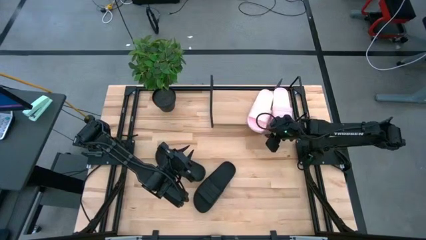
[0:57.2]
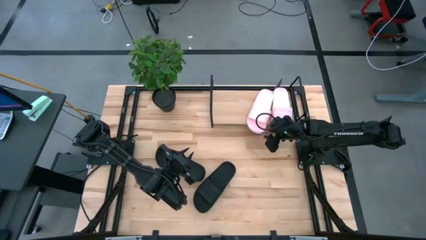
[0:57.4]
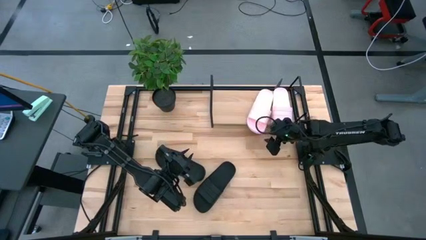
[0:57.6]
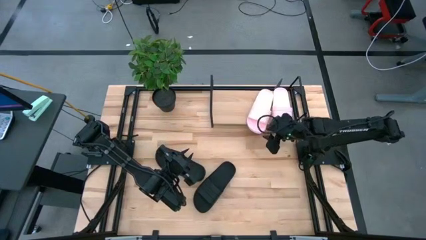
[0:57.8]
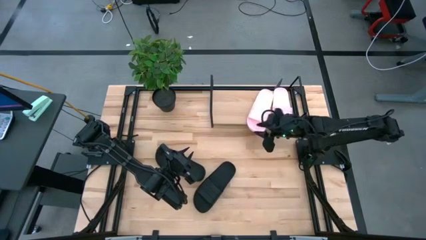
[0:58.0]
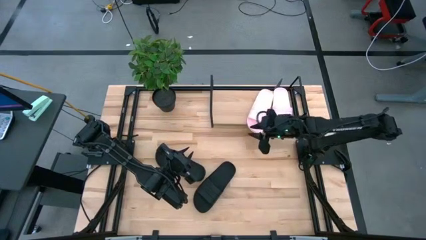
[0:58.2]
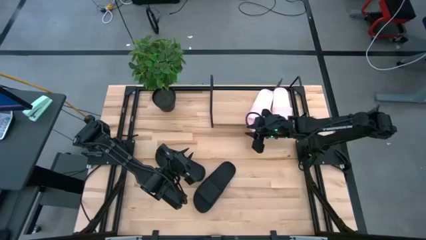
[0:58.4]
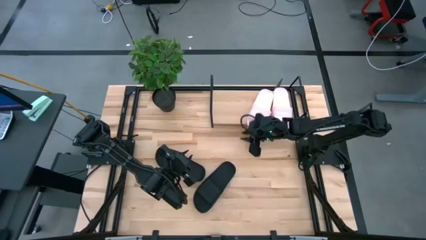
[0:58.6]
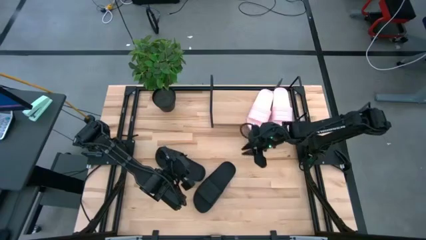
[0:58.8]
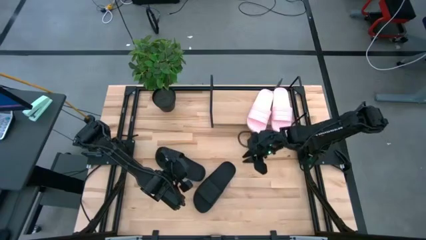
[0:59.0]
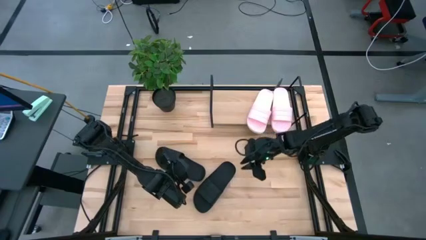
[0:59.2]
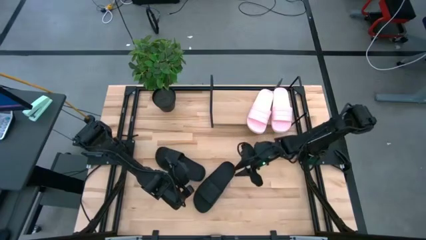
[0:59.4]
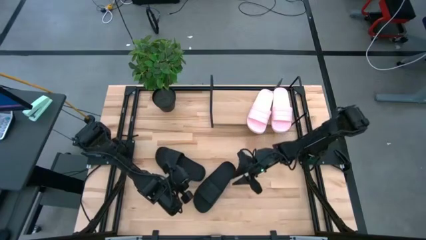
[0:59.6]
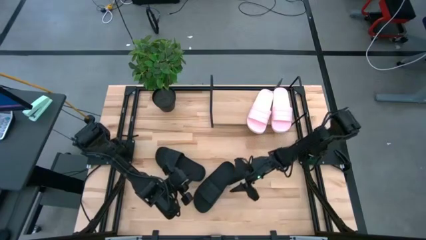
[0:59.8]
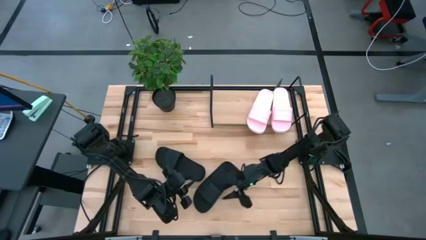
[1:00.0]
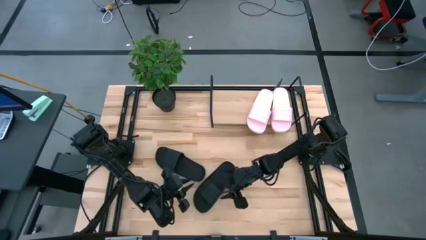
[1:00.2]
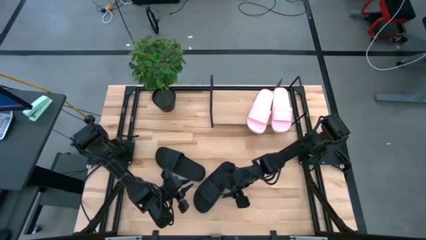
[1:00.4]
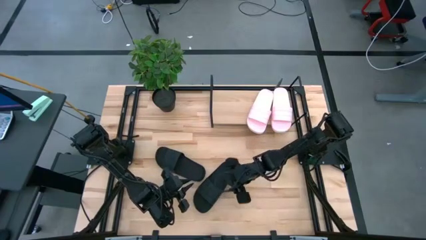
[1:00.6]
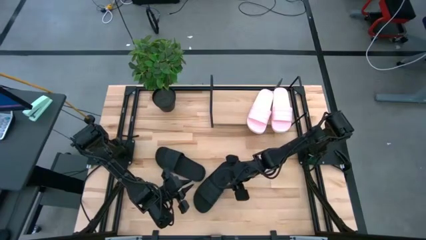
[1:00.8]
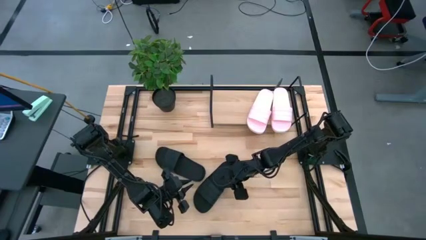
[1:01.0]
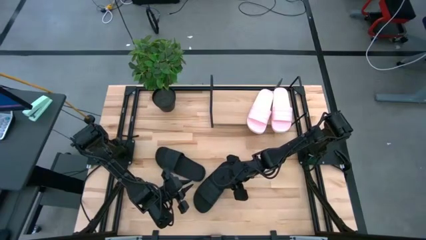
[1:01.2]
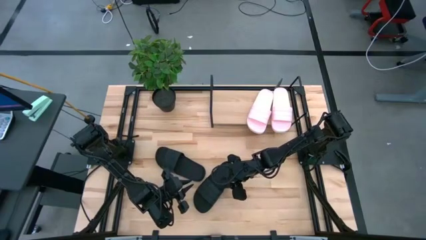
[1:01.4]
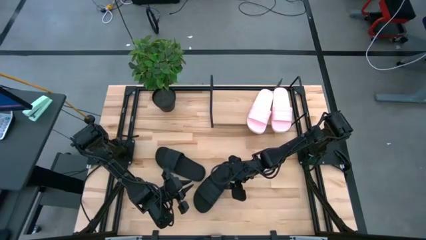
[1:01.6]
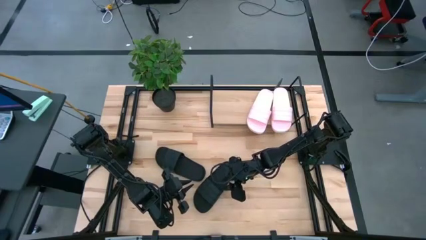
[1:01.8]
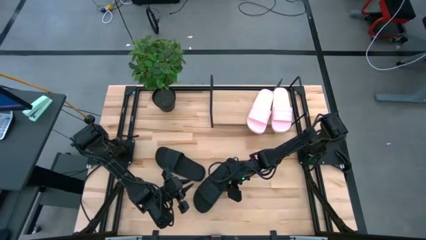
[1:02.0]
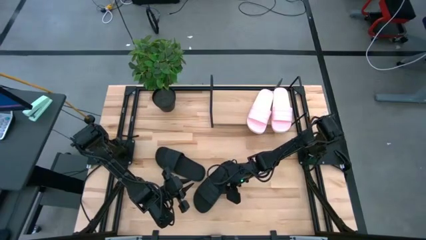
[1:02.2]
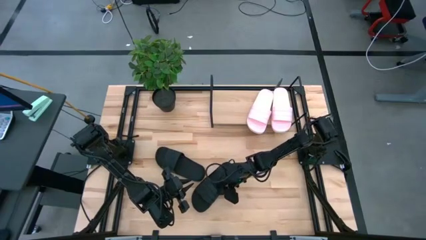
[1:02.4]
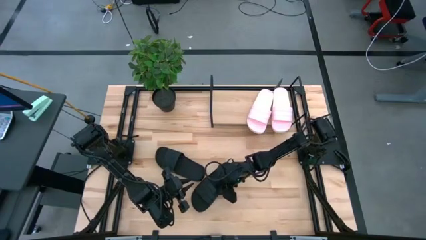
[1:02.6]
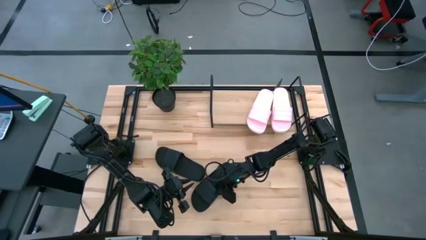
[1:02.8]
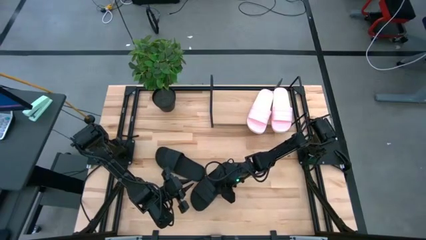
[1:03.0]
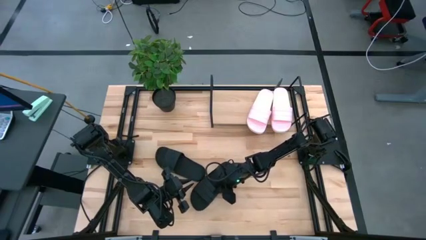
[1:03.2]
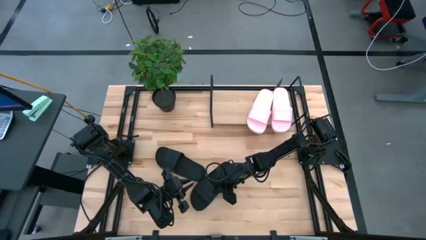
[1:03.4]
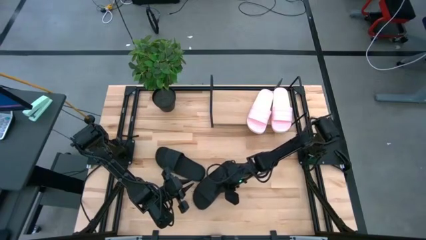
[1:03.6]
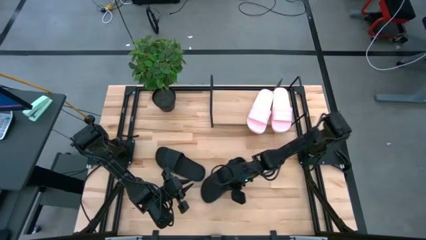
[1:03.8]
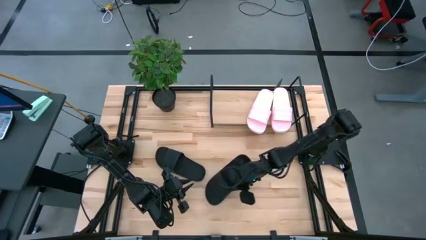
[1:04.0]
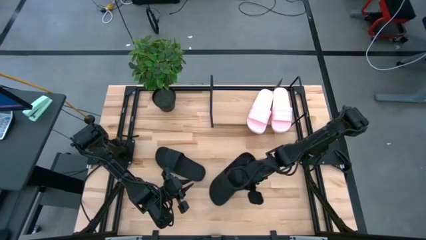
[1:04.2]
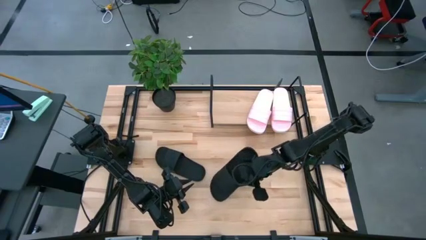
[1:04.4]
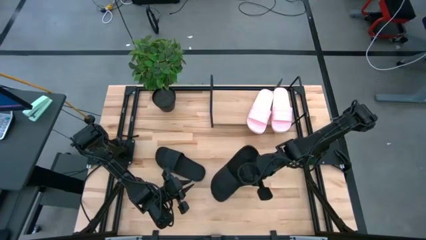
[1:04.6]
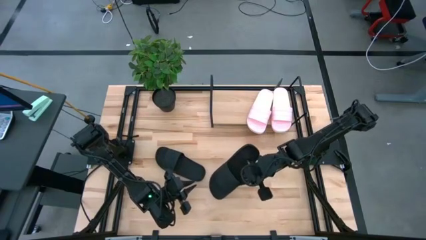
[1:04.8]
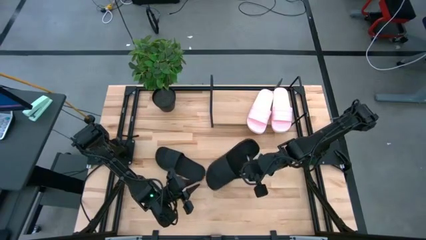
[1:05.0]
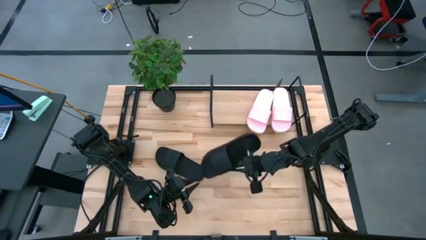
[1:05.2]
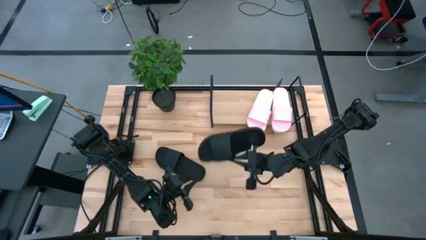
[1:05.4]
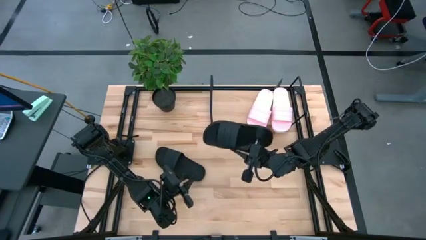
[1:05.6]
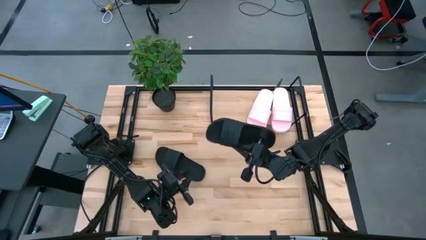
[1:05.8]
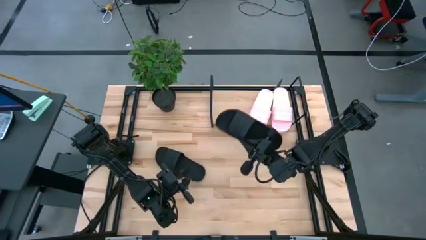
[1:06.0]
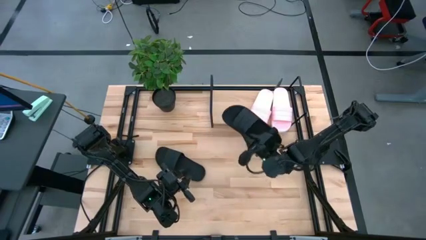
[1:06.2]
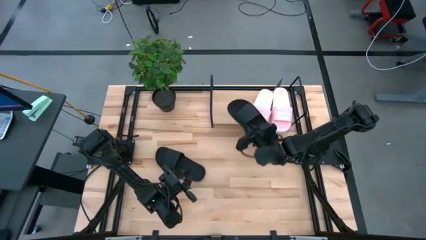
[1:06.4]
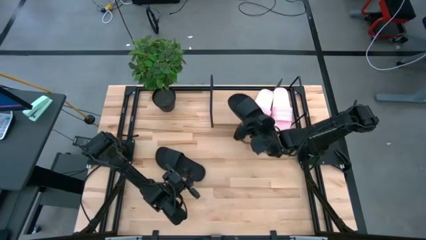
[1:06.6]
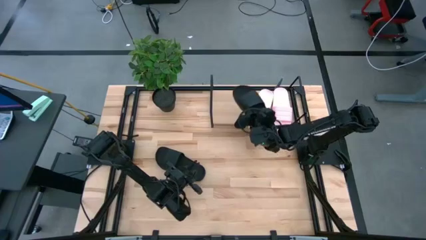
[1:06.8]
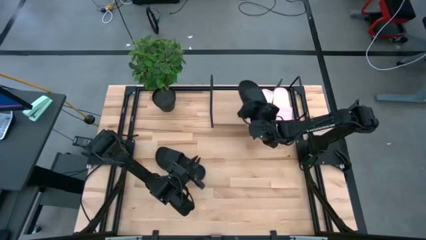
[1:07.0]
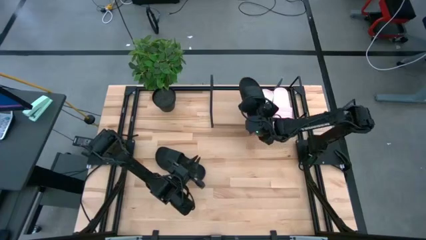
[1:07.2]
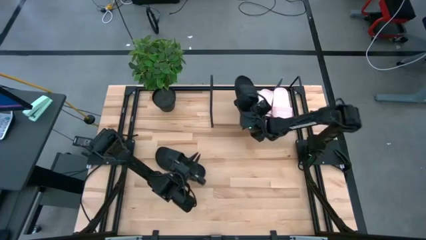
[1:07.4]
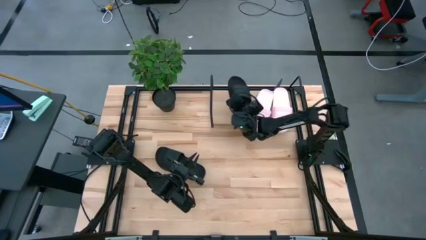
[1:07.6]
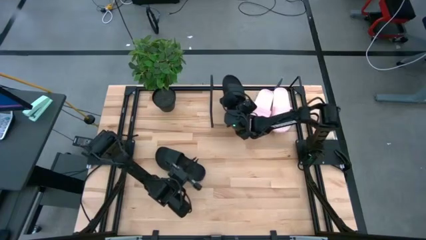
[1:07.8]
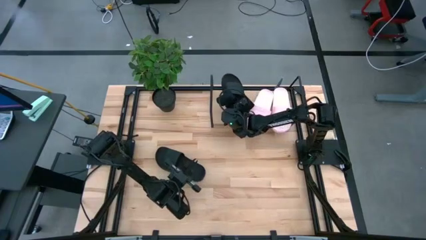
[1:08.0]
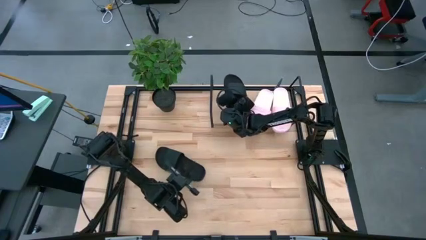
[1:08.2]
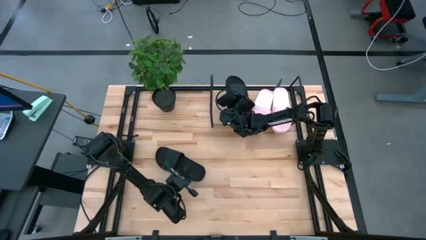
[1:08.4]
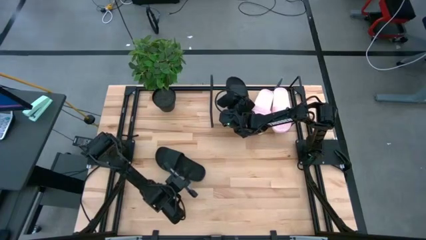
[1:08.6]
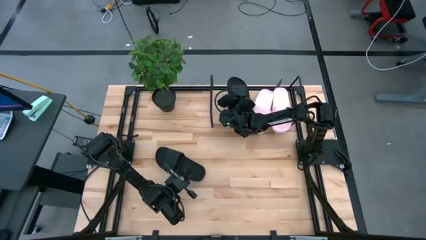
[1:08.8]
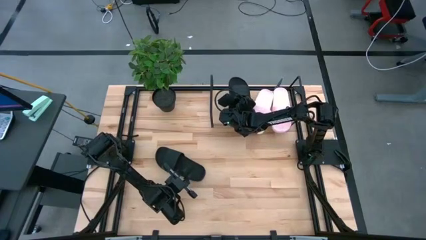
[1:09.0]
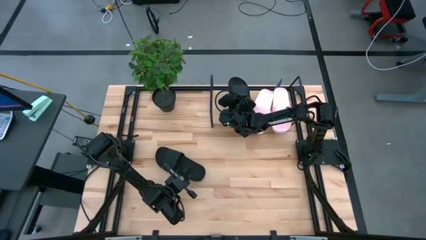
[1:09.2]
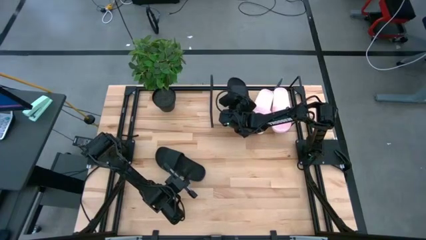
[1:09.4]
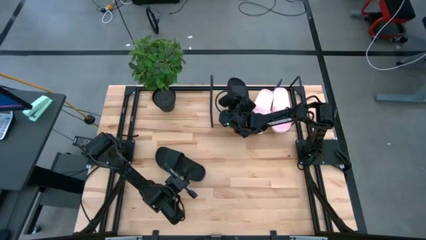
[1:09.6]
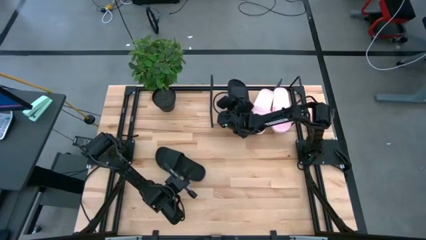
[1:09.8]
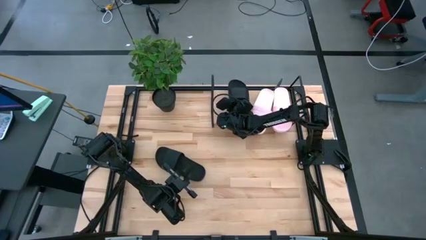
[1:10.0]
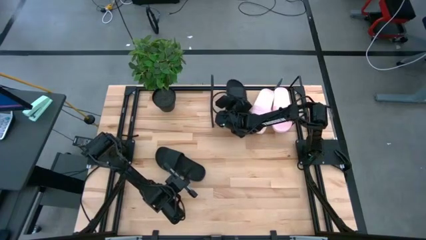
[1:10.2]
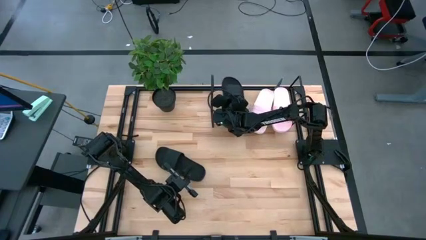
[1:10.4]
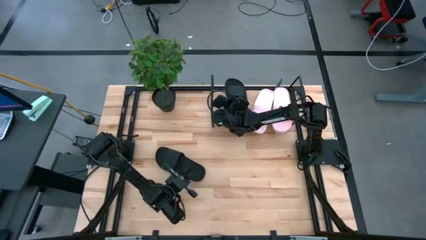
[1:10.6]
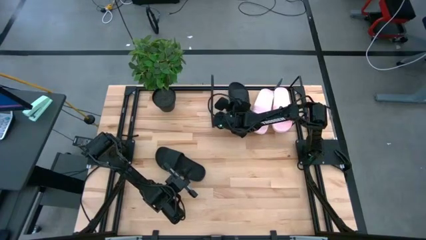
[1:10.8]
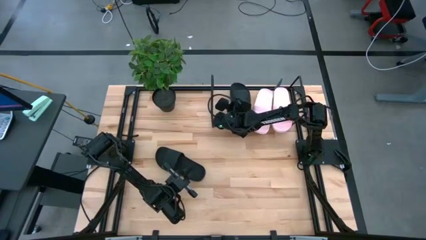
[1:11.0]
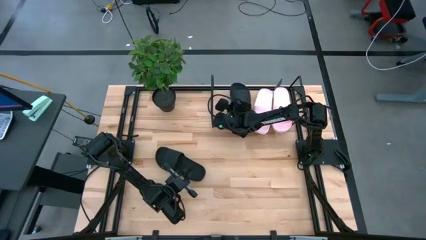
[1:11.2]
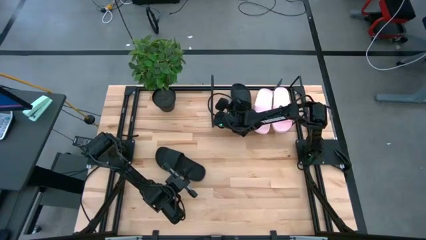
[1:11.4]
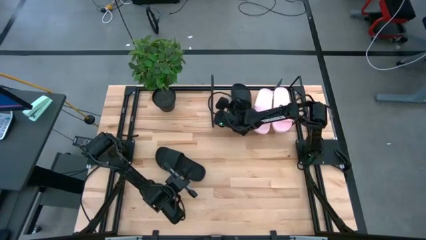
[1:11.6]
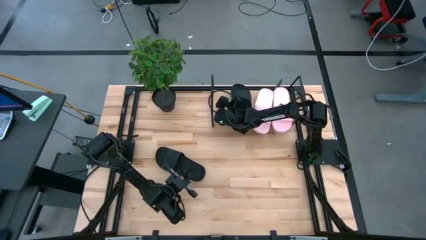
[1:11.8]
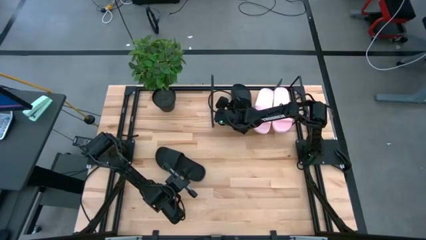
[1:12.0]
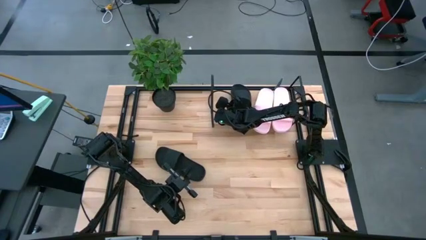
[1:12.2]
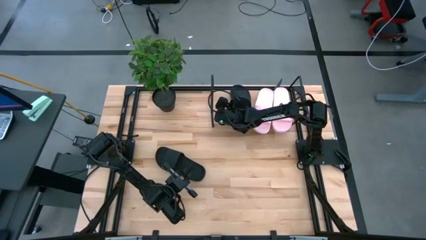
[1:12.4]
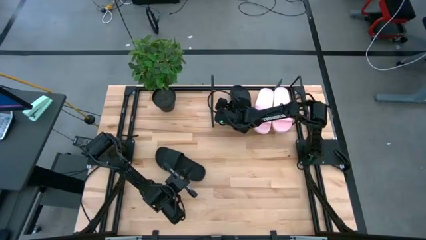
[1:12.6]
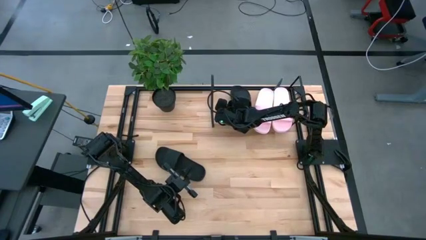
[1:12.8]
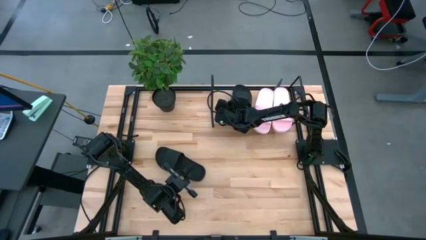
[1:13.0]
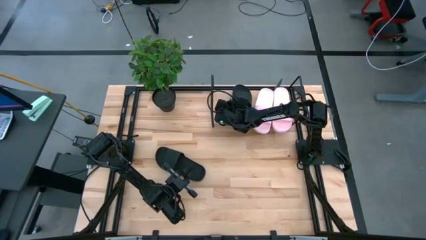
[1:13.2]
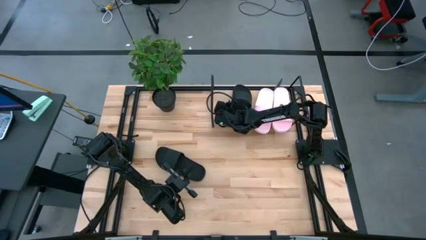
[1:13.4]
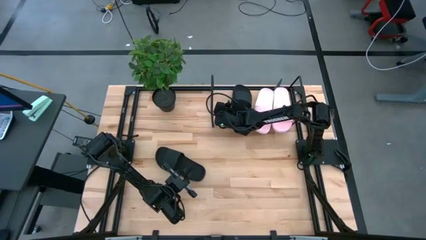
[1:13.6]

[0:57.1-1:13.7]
Task: Pick and place slides into the shelf
Put the right black slide on the shelf
